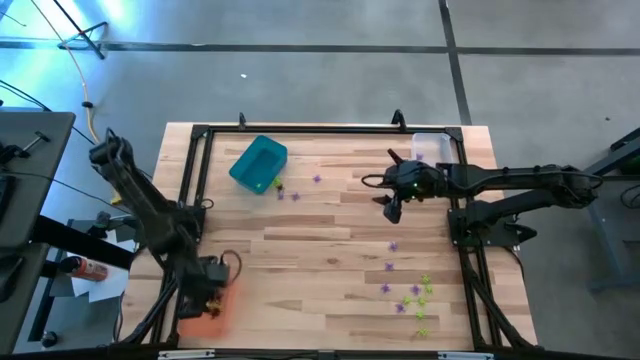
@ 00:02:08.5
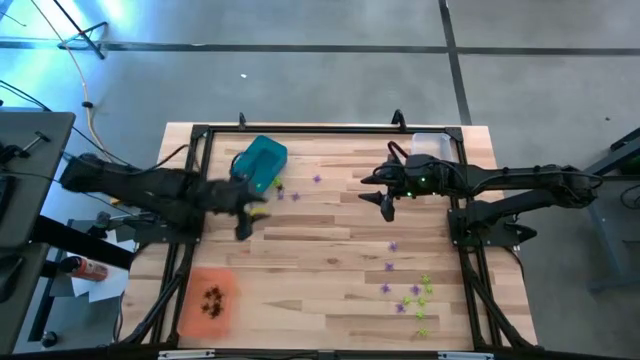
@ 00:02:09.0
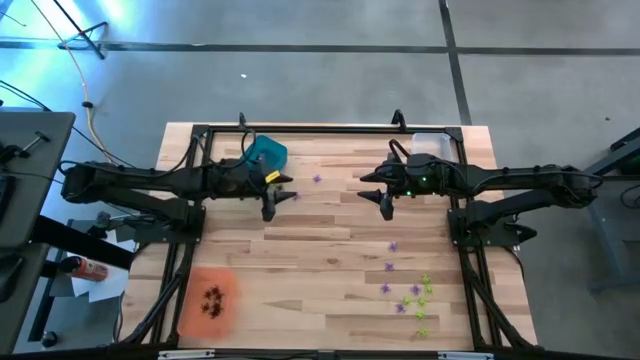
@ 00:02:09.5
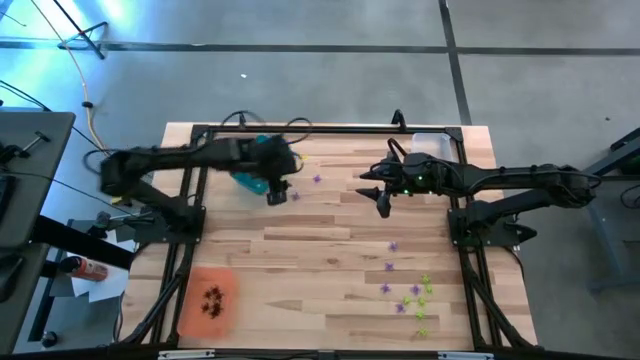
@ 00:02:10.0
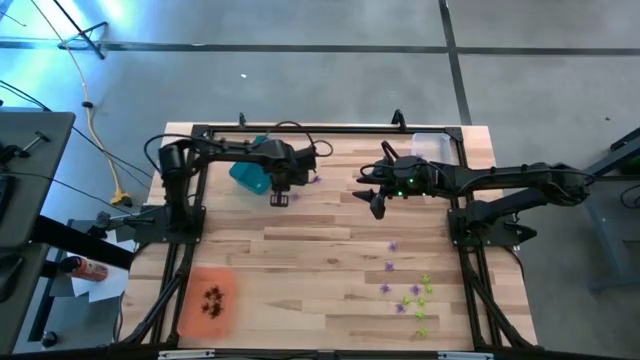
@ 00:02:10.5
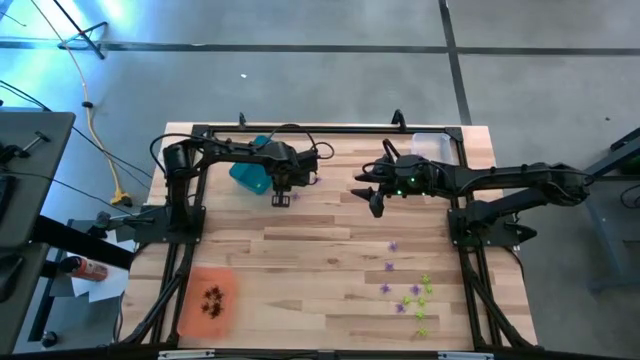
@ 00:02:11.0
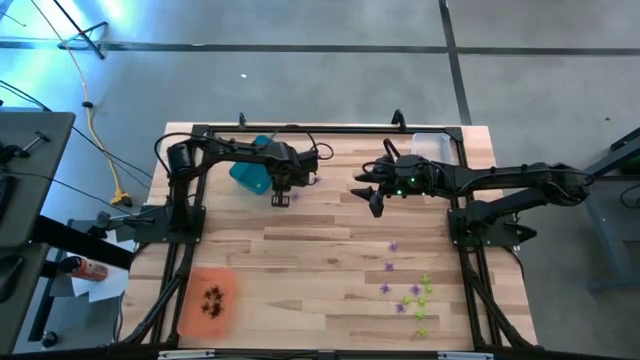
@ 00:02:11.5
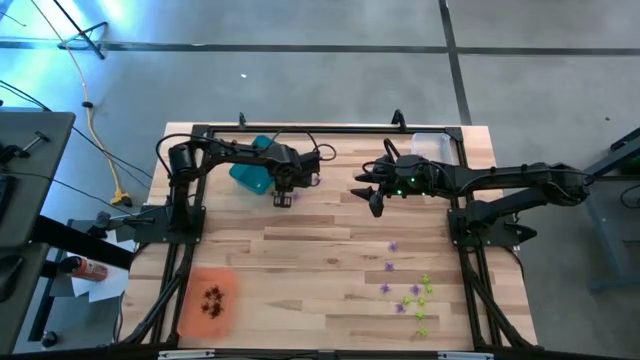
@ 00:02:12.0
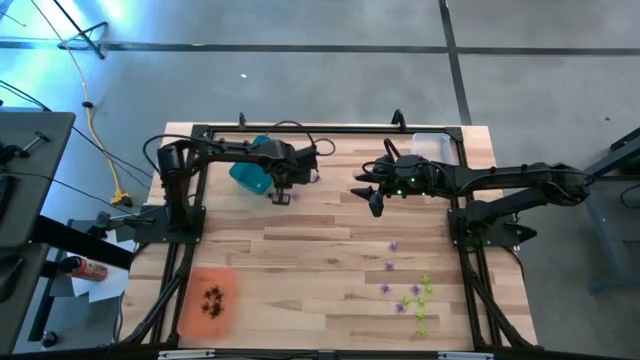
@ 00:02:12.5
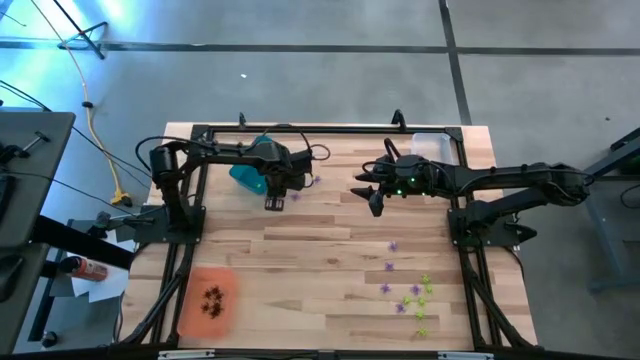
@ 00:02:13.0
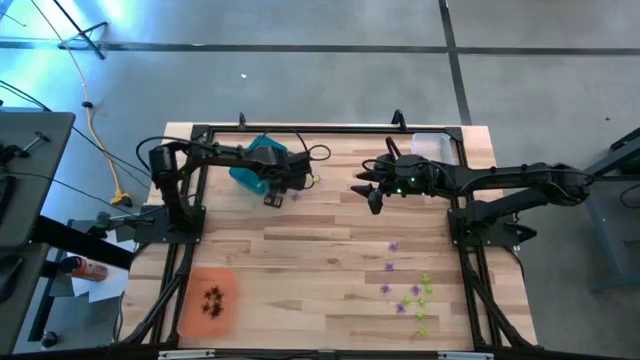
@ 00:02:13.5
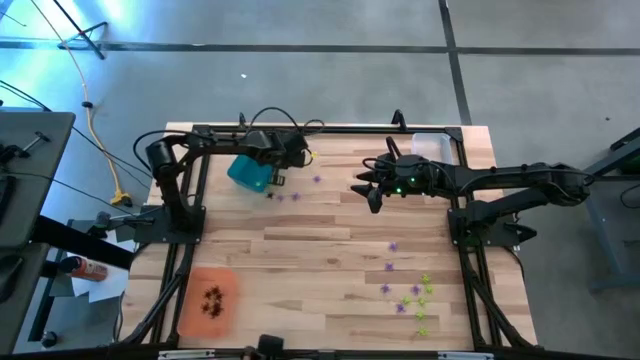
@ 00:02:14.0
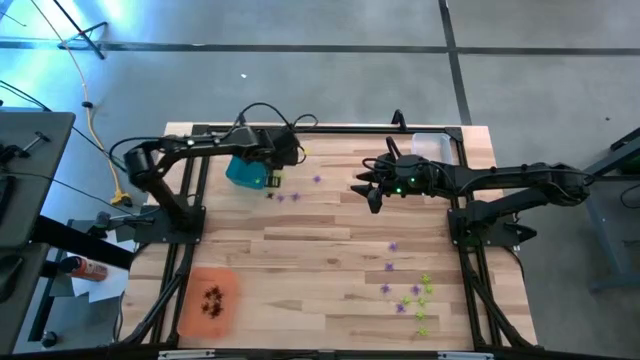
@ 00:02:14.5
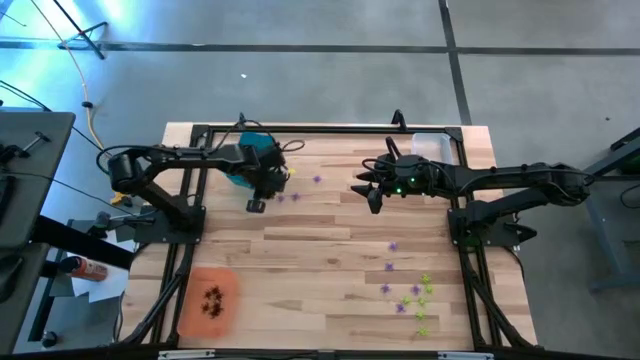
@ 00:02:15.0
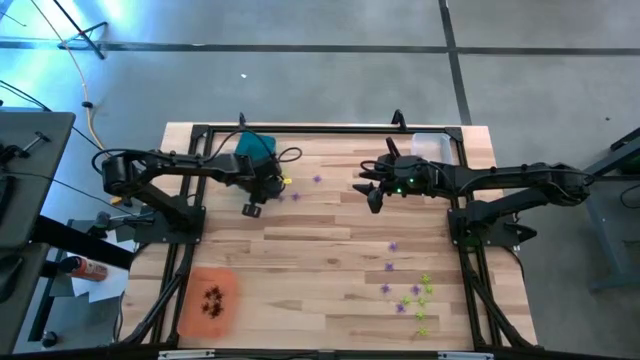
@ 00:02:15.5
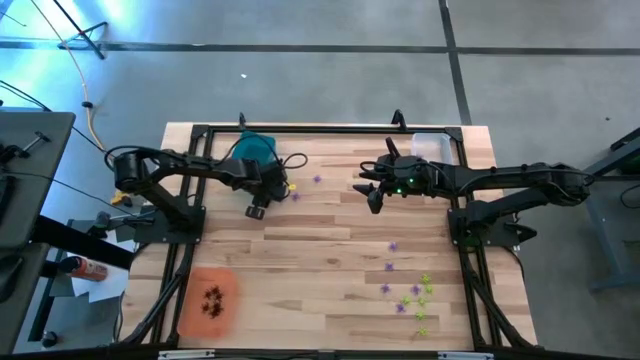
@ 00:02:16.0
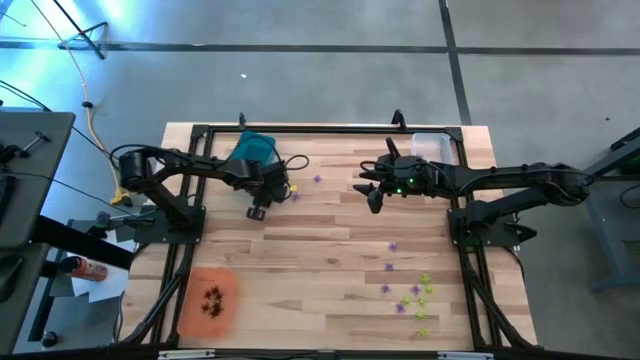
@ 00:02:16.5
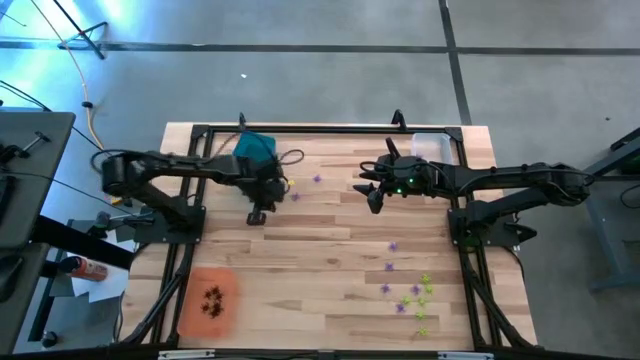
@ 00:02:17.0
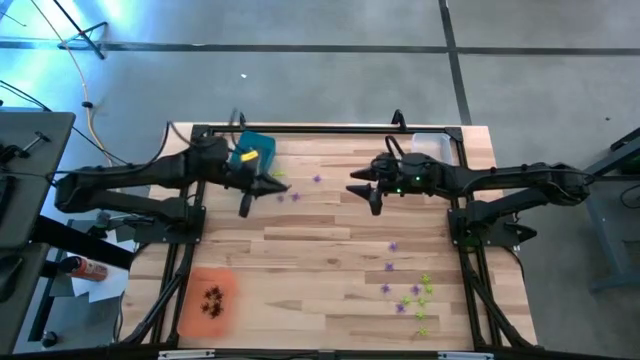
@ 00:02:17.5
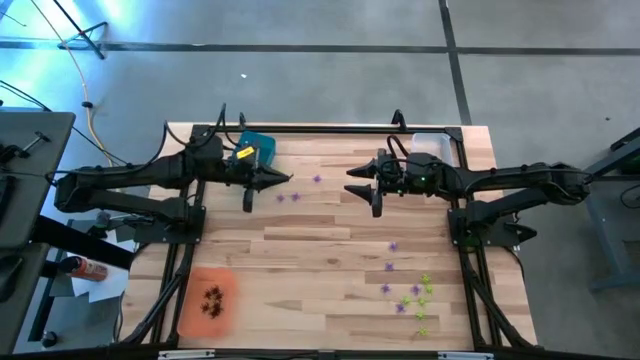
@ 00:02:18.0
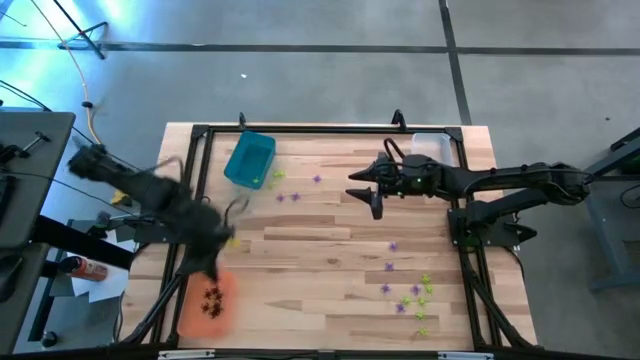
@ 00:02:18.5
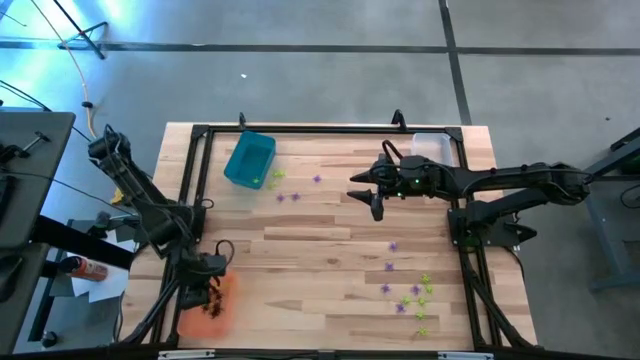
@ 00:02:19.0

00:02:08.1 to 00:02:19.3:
Task: Sort Halloween decoration
Put the black spider toy into the orange bin

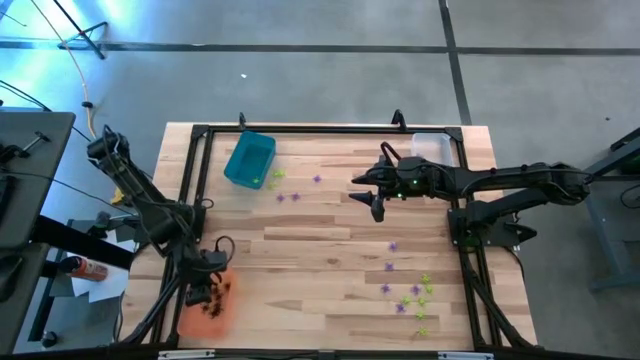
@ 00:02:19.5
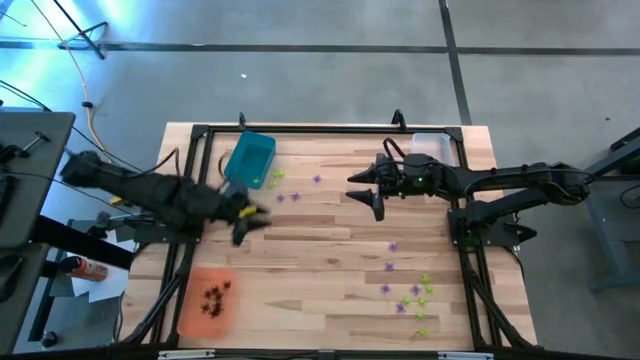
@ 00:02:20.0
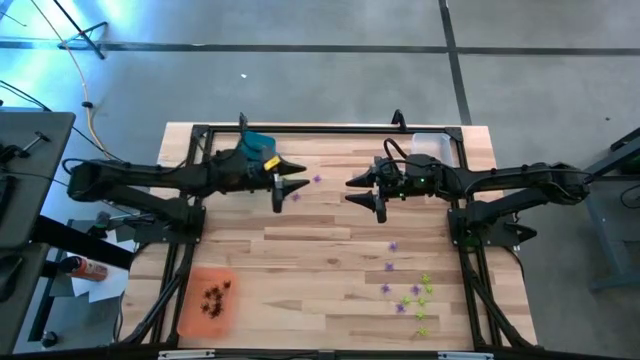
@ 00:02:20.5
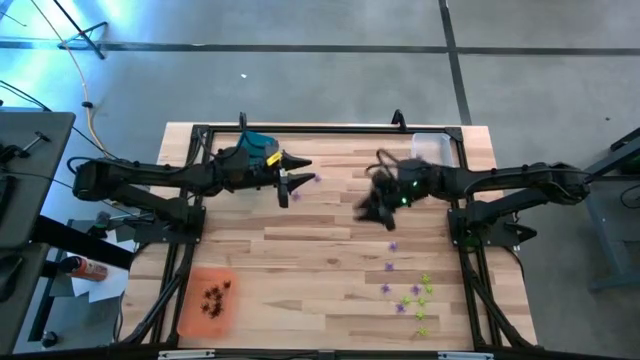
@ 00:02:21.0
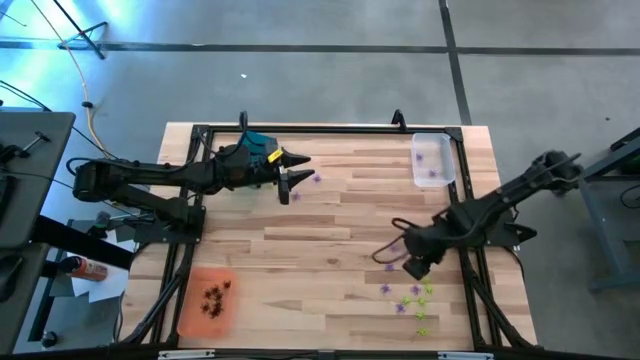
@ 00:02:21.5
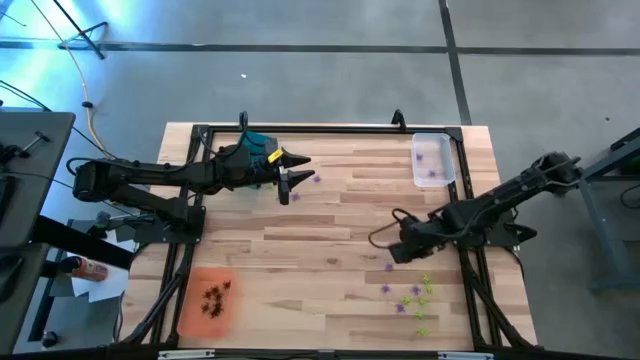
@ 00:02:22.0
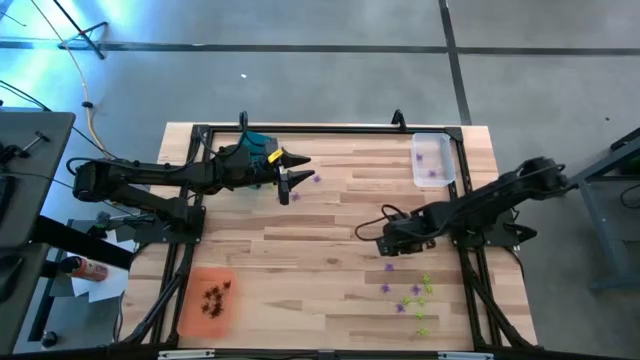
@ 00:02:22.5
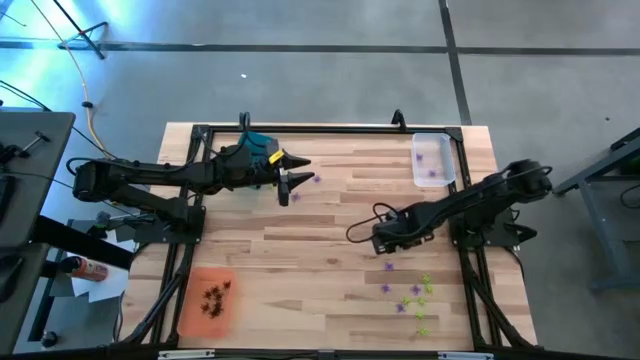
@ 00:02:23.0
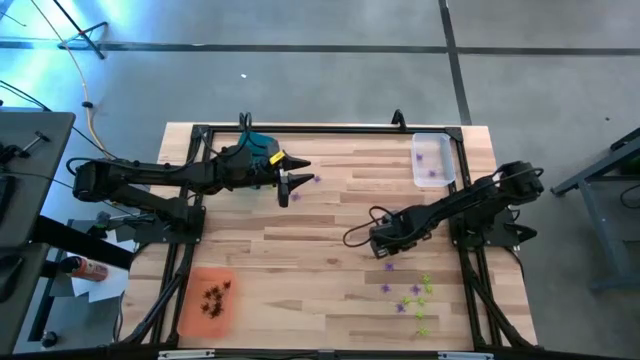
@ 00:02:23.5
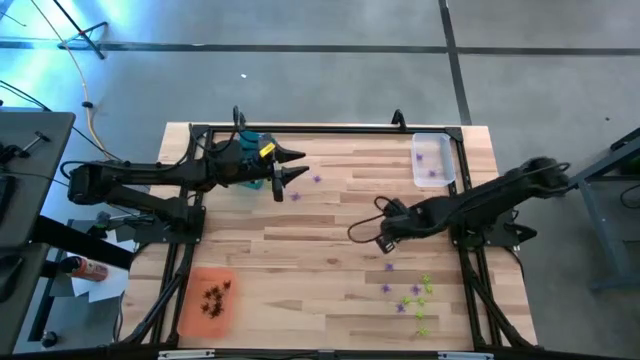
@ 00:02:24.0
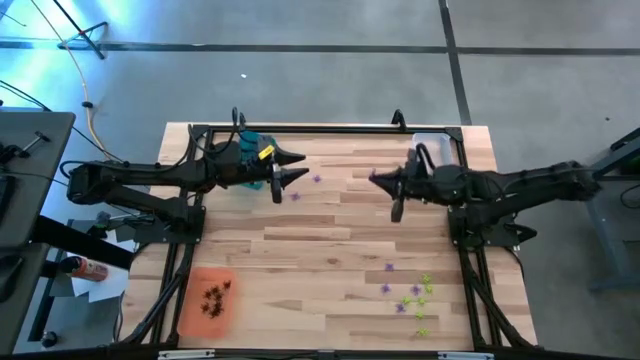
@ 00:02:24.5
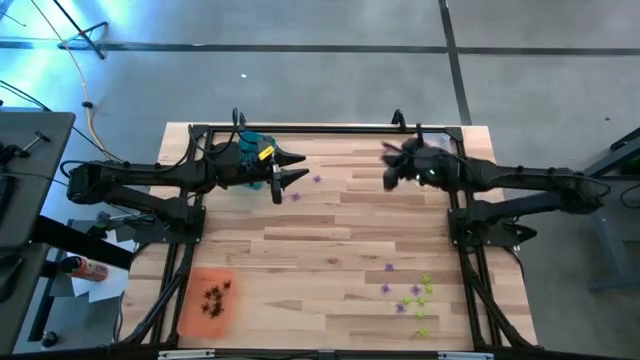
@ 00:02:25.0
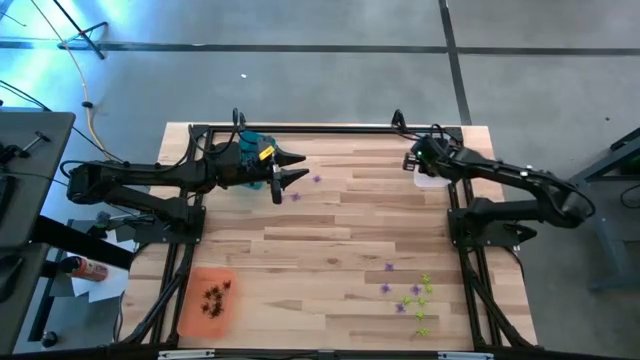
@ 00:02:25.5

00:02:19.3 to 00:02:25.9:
Put the purple spider toy into the transparent bin

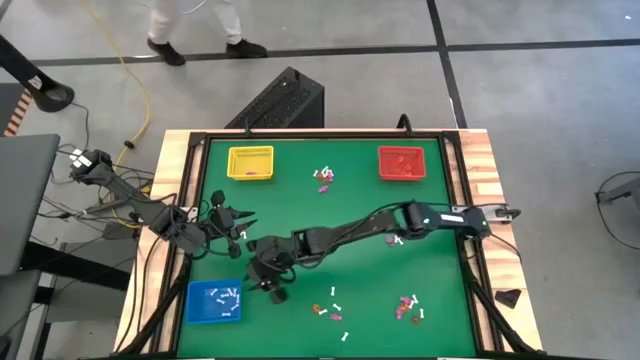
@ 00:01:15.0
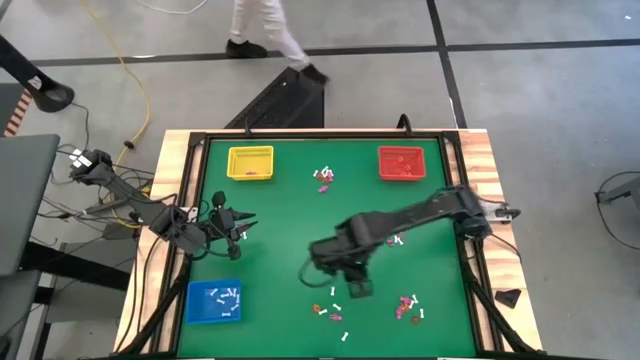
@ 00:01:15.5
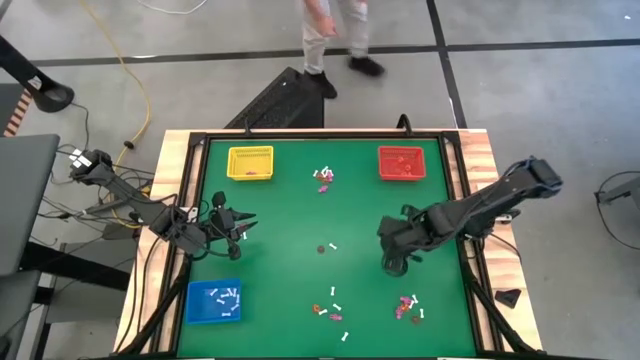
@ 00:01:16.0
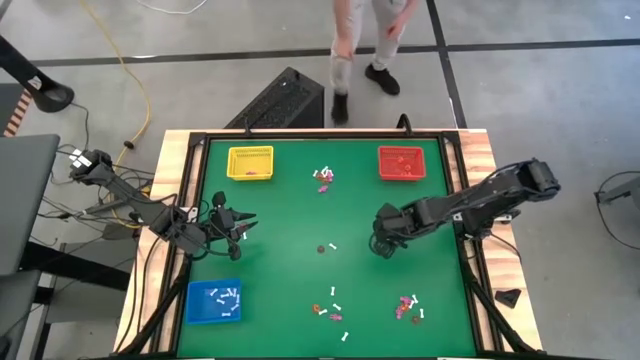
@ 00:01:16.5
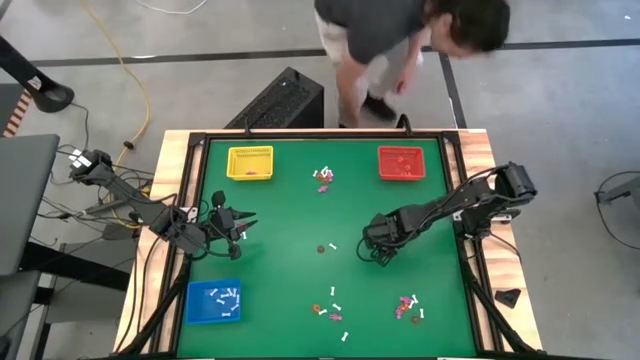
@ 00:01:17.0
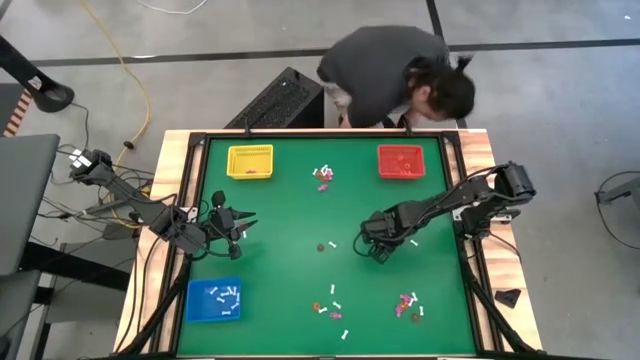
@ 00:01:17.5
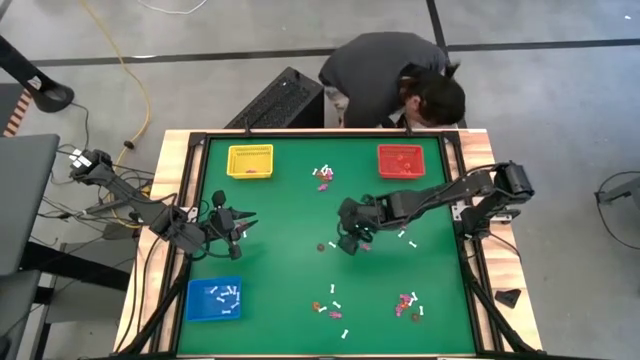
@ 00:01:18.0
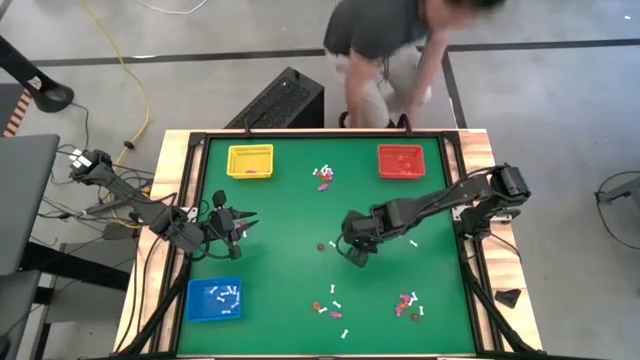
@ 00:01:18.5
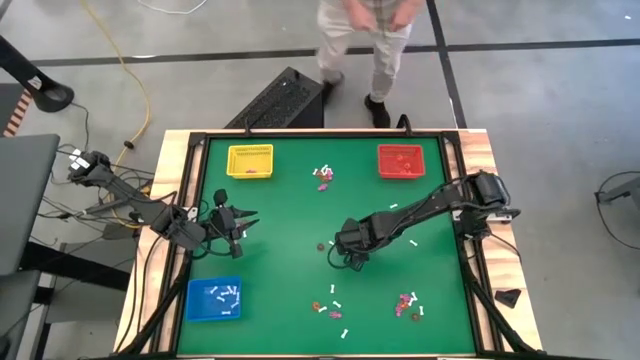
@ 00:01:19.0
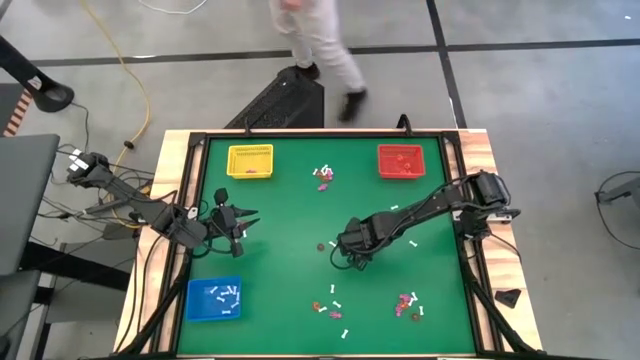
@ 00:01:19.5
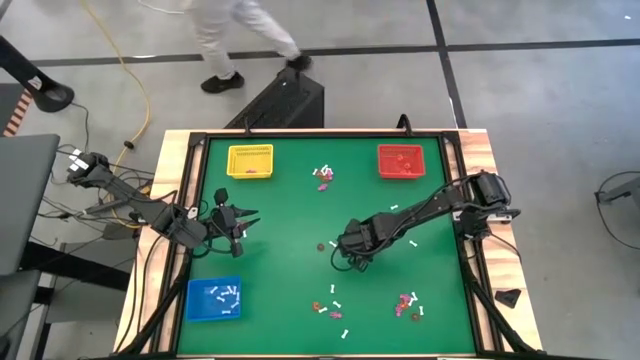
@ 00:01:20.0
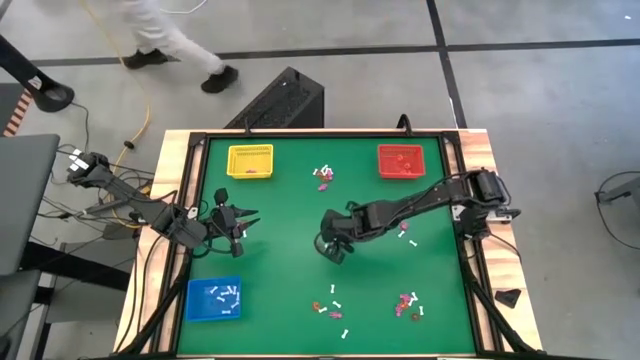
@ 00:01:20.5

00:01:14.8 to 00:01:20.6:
Task: Sort Halloween decoration
Put the pink skeleton toy into the yellow bin
